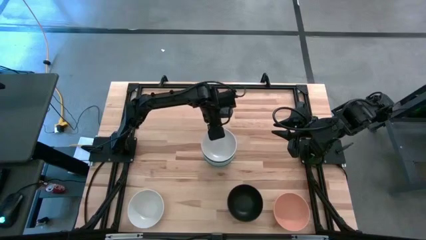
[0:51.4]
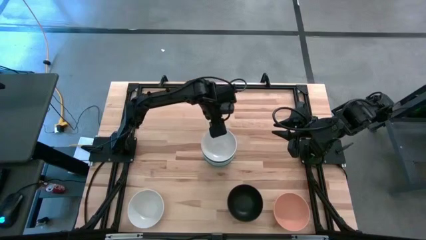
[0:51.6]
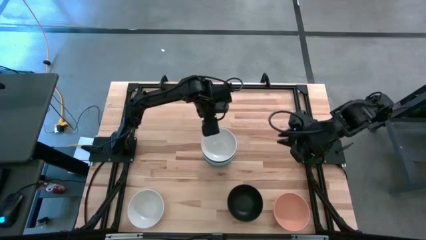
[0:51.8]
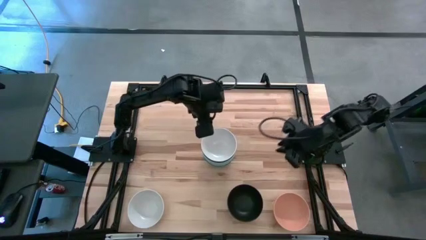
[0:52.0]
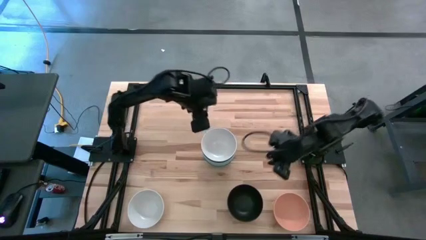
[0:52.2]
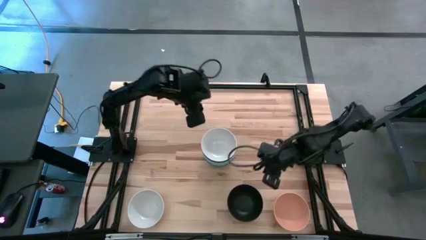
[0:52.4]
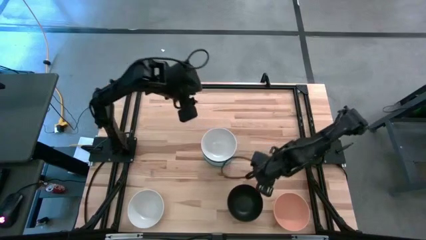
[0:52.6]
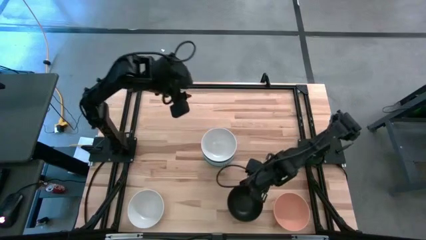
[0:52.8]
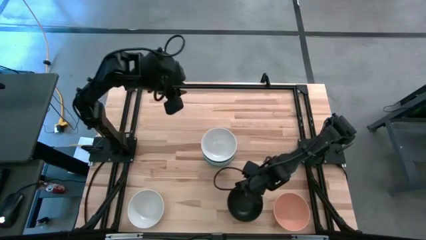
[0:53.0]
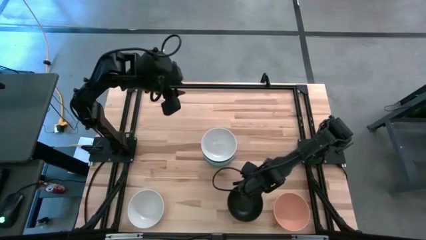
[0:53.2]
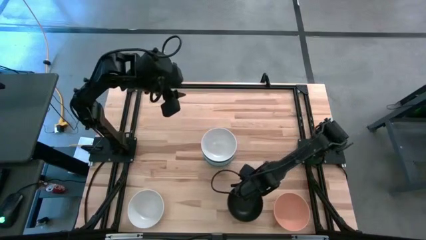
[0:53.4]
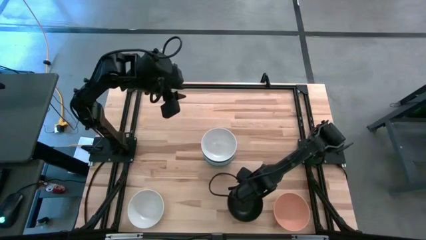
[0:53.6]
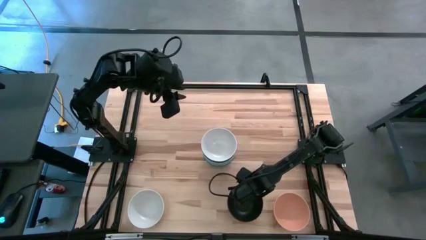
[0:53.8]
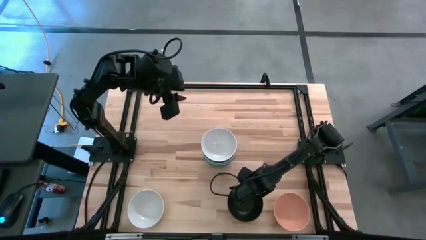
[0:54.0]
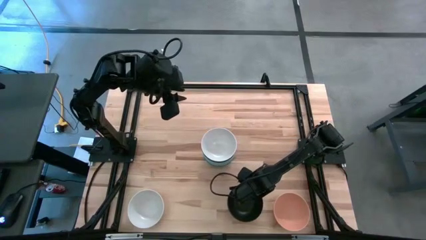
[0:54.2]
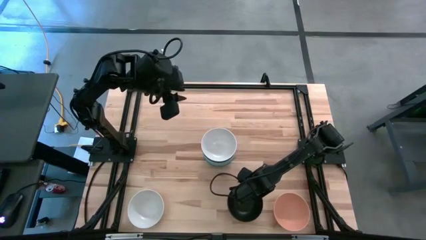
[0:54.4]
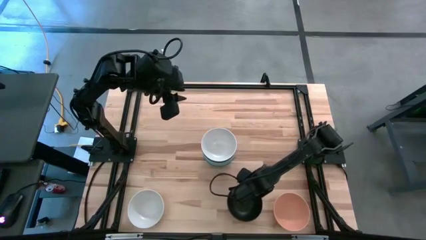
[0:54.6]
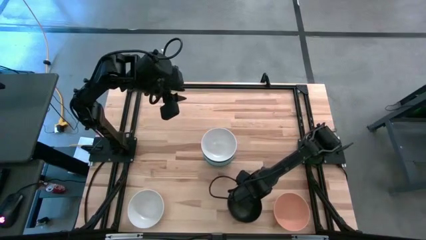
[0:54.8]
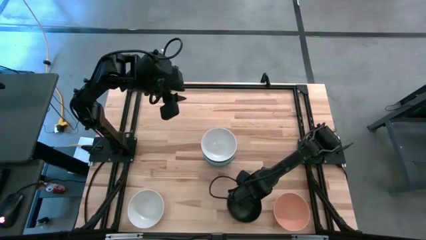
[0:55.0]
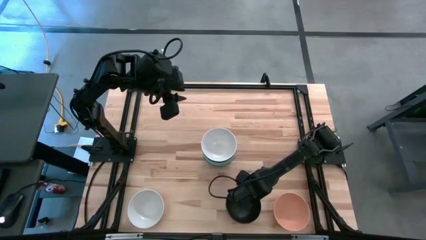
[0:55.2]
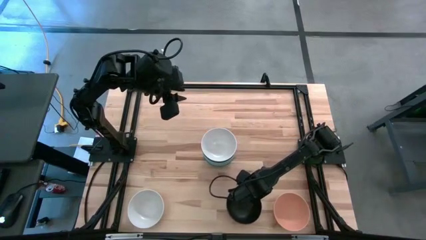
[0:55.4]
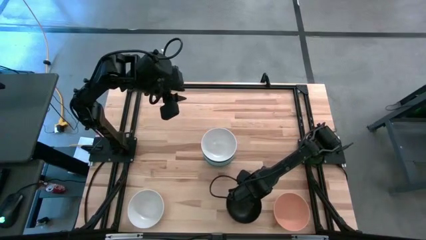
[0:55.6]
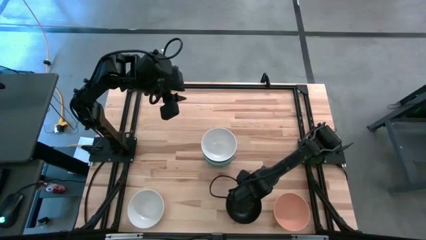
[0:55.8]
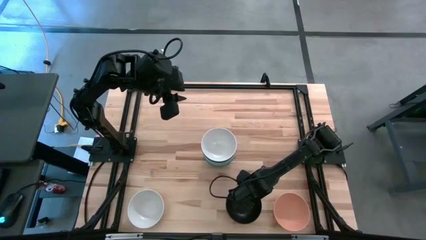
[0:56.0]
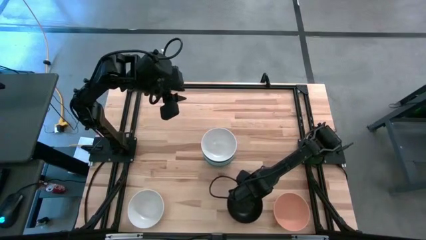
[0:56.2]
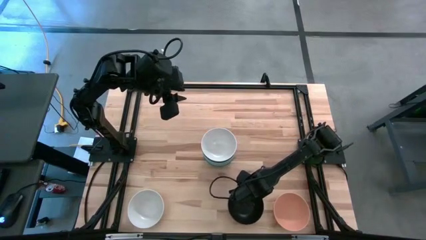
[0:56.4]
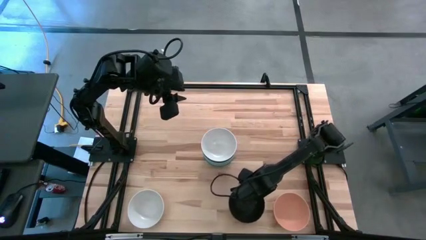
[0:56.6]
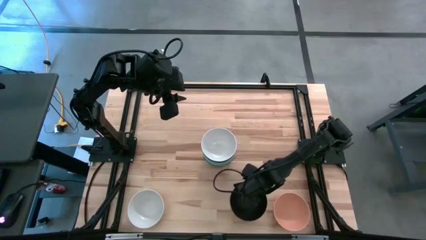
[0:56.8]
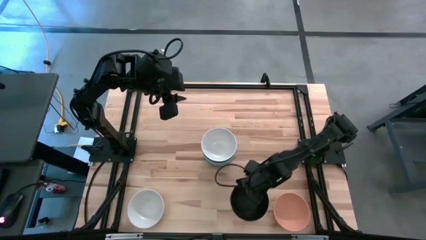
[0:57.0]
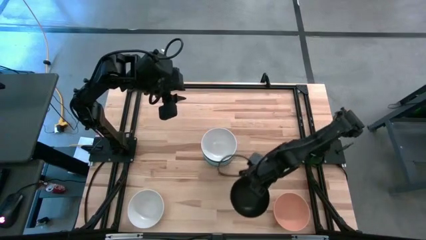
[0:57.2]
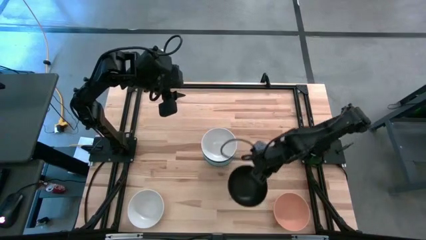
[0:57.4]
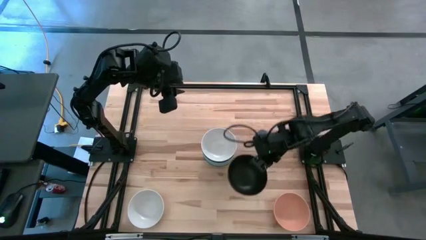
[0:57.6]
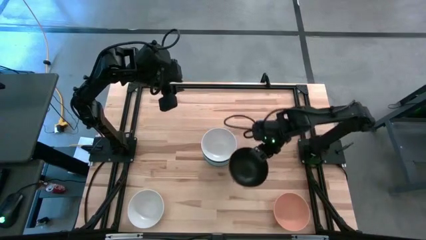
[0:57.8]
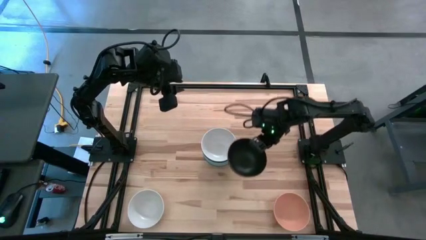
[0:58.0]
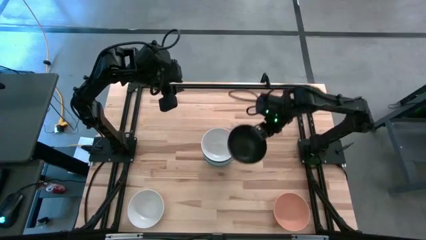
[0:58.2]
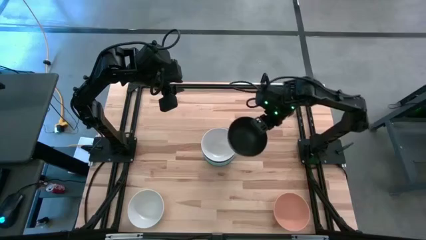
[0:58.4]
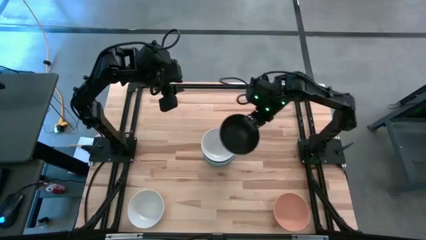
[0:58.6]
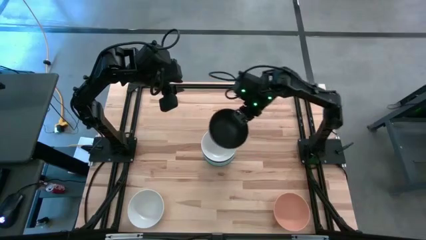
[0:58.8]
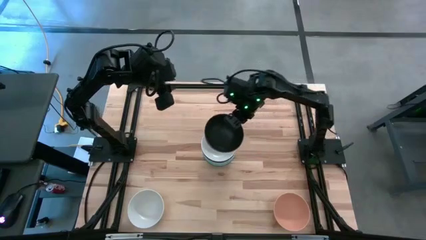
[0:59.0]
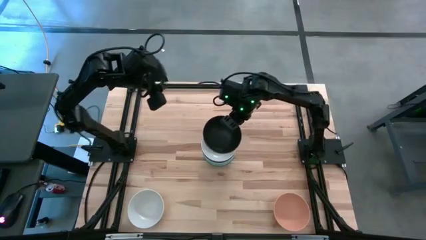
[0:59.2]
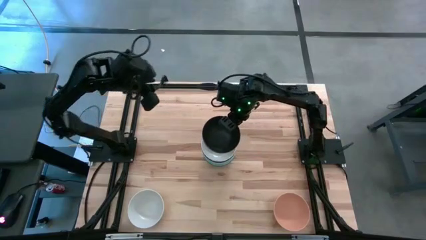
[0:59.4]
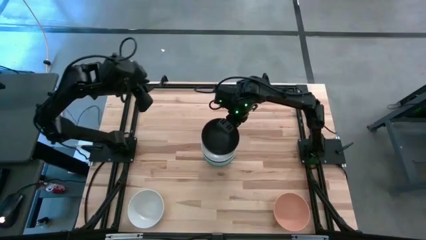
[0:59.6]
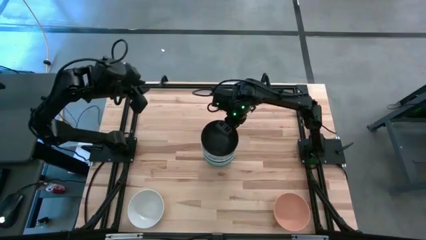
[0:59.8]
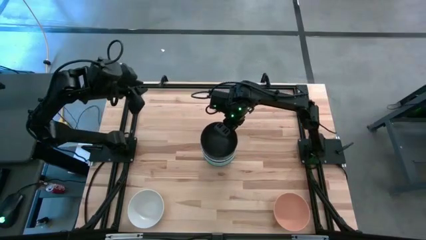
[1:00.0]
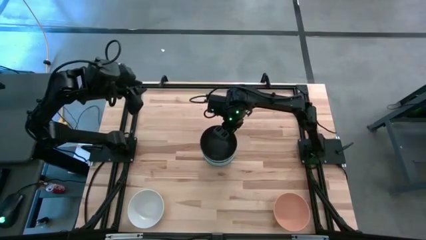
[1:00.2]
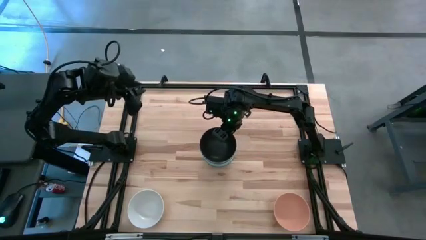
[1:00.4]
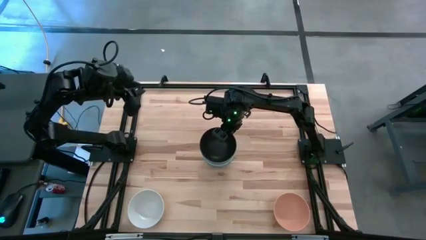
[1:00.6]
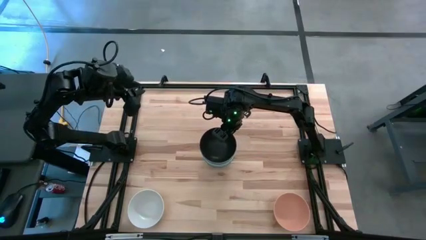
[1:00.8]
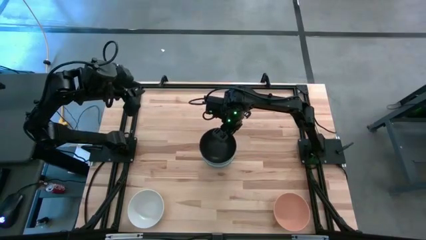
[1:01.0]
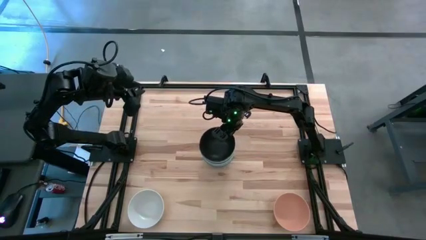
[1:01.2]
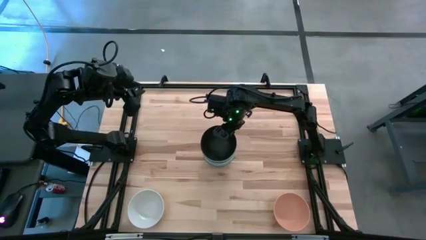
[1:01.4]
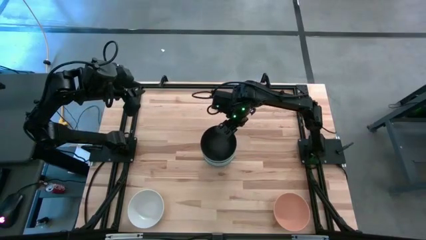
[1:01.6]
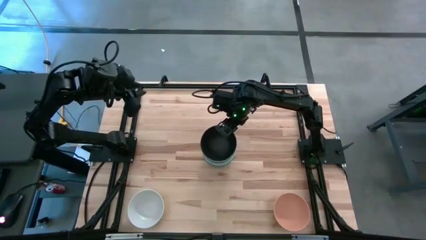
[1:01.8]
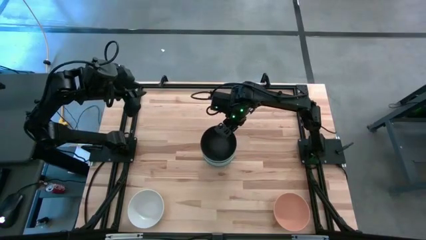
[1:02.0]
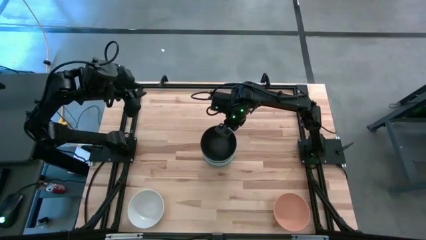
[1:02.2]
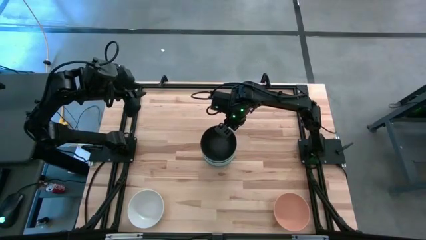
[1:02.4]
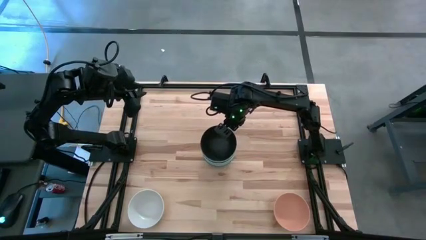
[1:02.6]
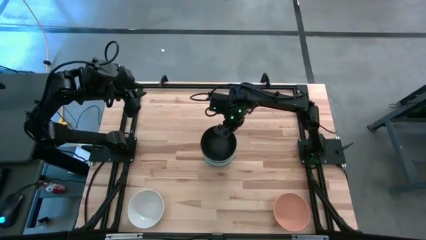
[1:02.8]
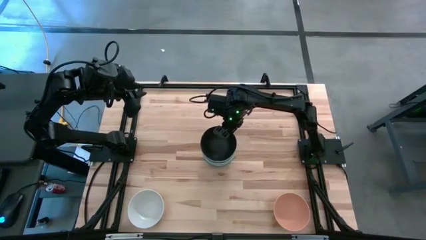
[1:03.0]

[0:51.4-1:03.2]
Task: Nest bowls inside each other
Stack the black bowl on the white bowl

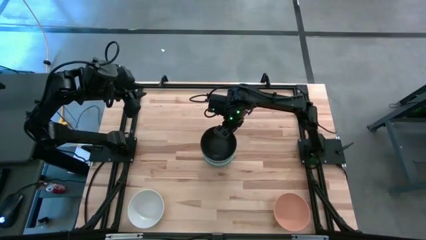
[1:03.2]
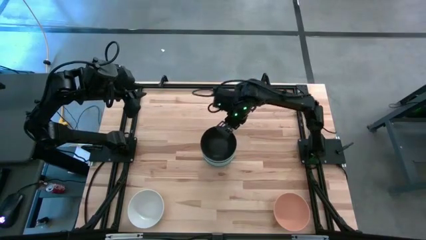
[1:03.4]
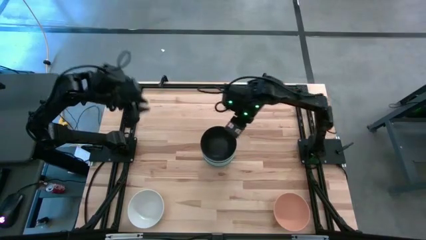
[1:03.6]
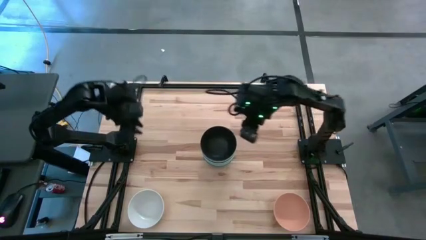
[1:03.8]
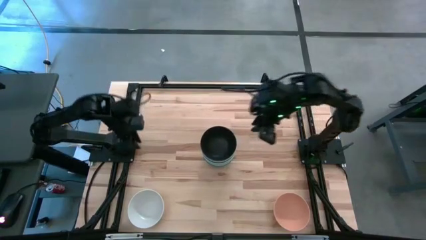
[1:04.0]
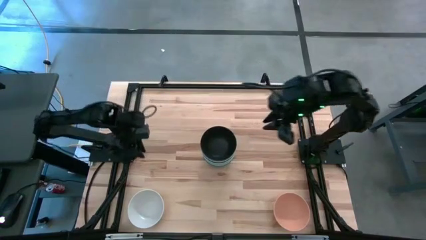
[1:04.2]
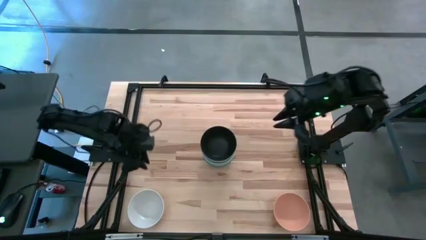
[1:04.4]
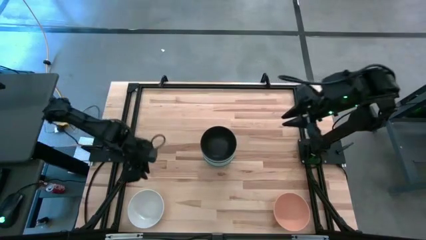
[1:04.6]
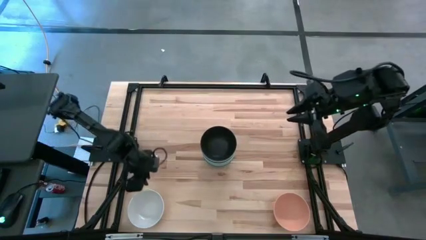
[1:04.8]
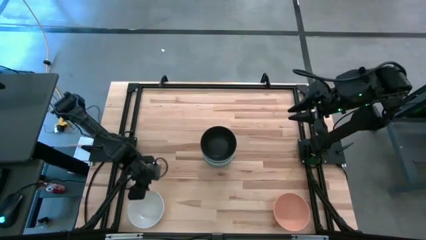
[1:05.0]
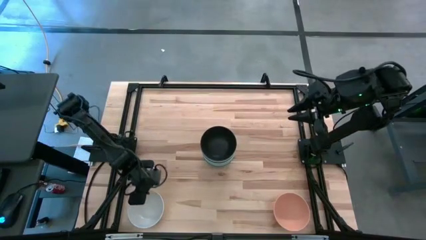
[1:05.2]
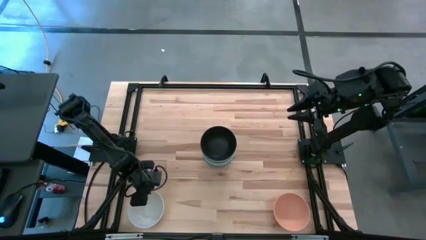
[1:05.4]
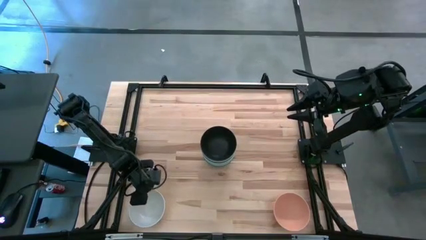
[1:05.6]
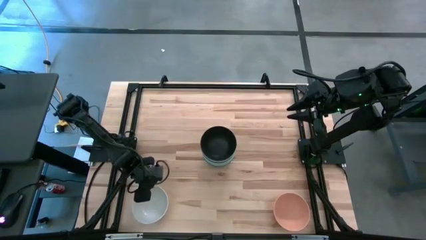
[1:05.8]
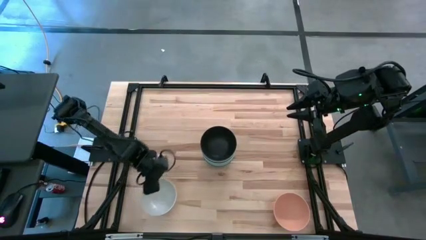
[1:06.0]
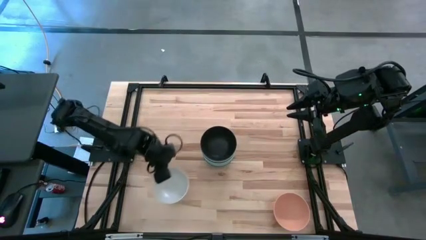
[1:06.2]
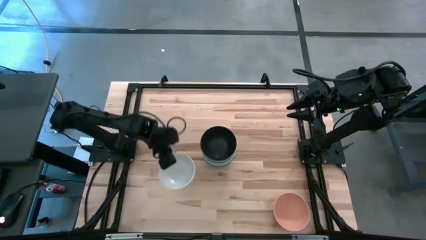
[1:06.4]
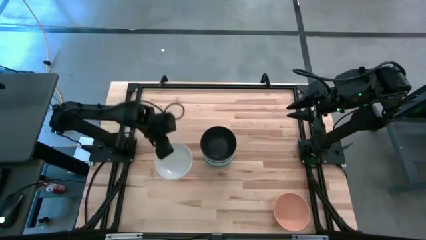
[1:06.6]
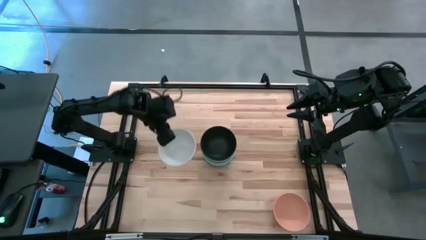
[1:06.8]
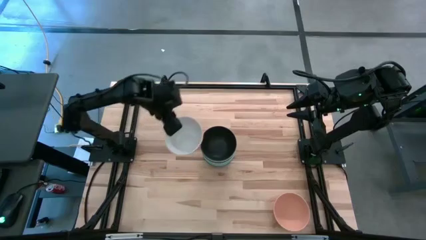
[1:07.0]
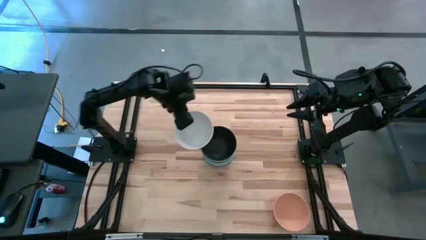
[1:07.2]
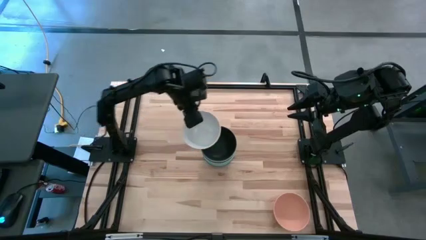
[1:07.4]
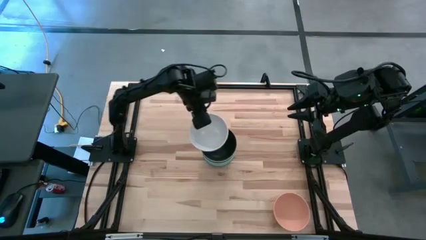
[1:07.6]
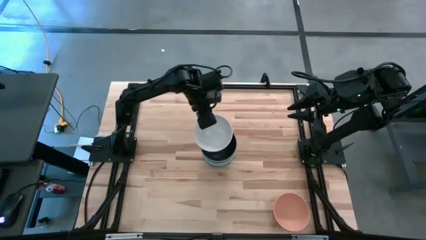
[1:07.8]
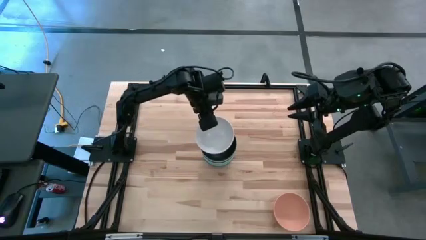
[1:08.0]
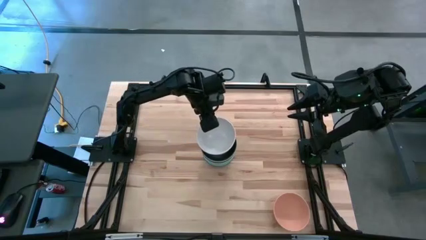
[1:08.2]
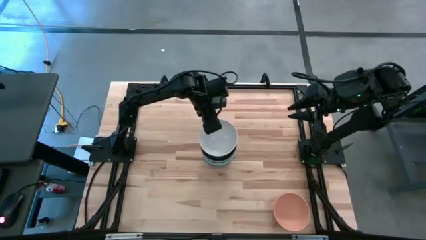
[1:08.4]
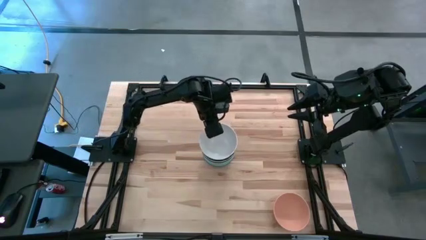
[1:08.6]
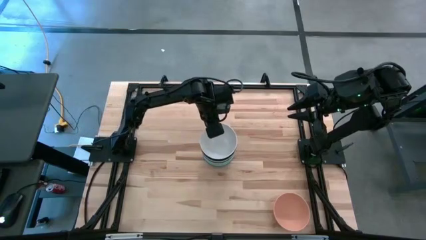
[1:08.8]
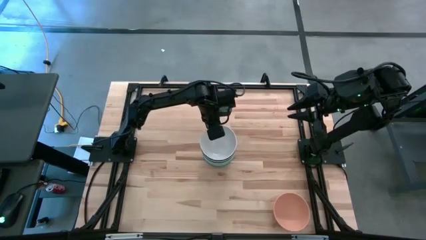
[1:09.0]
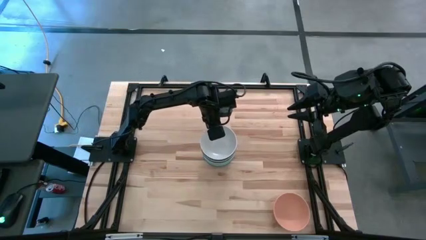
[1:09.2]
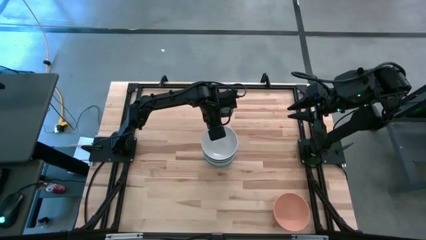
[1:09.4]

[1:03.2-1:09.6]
Stack the white bowl on the black bowl
